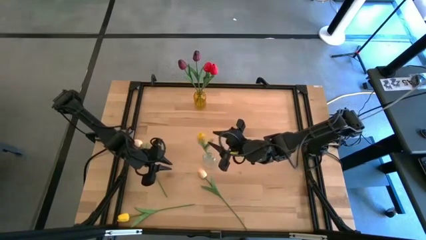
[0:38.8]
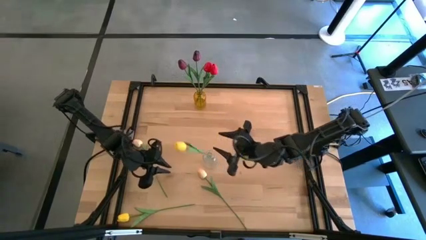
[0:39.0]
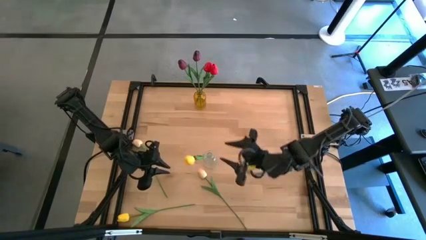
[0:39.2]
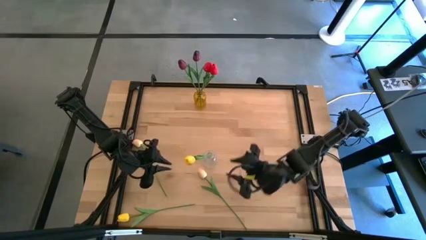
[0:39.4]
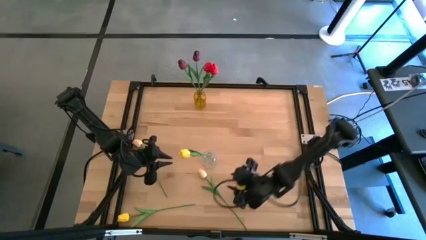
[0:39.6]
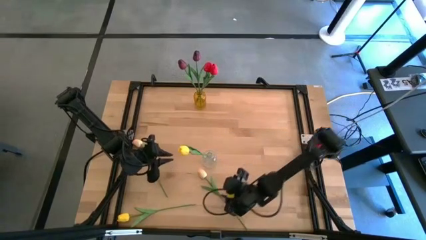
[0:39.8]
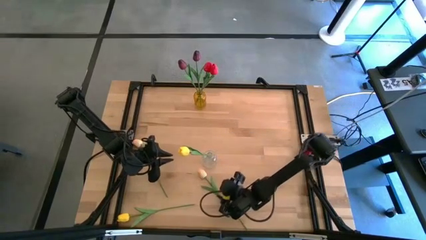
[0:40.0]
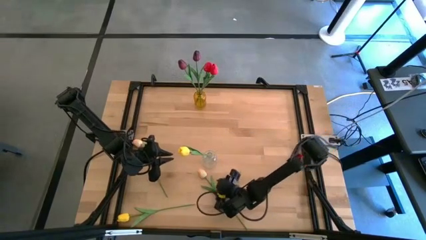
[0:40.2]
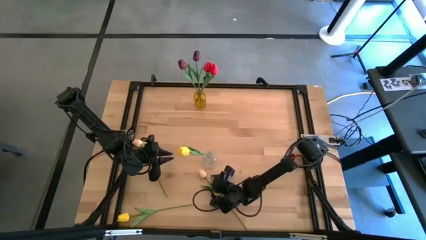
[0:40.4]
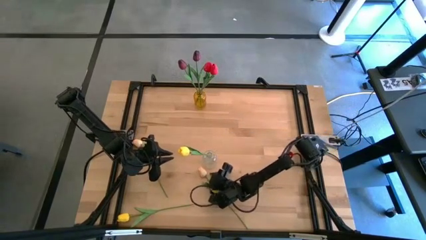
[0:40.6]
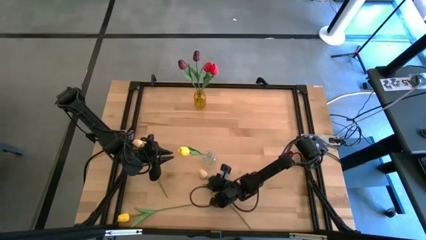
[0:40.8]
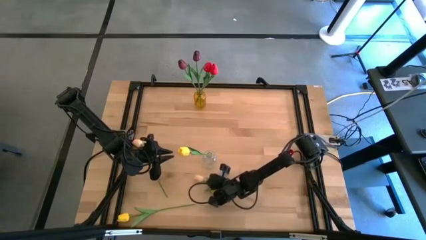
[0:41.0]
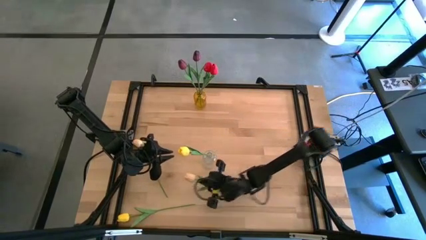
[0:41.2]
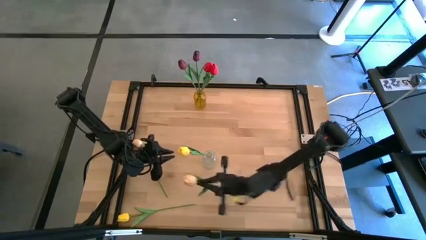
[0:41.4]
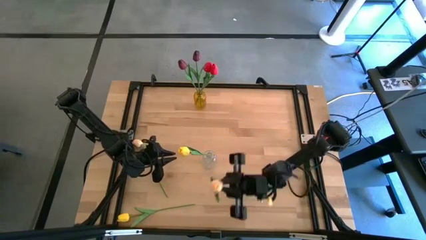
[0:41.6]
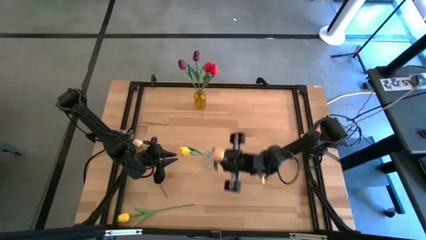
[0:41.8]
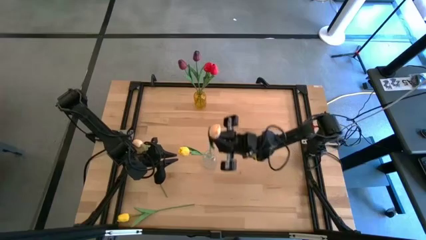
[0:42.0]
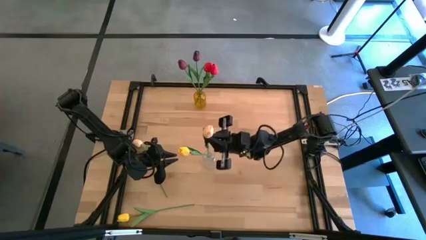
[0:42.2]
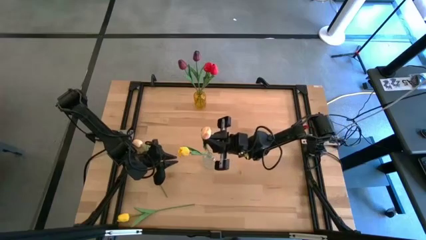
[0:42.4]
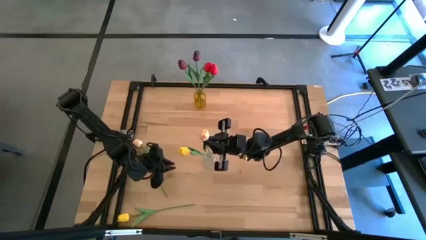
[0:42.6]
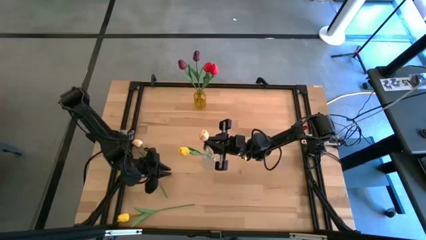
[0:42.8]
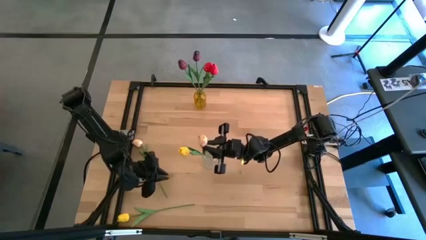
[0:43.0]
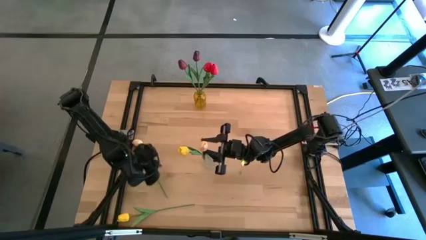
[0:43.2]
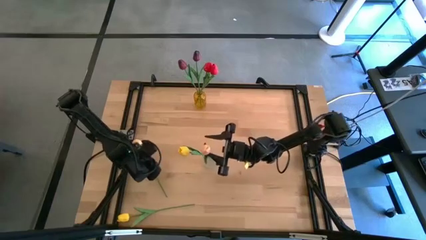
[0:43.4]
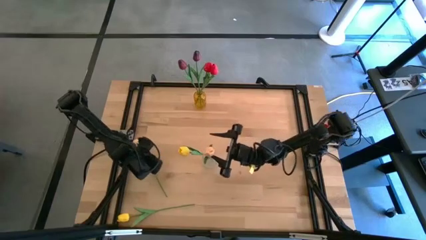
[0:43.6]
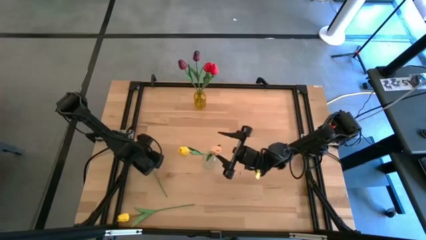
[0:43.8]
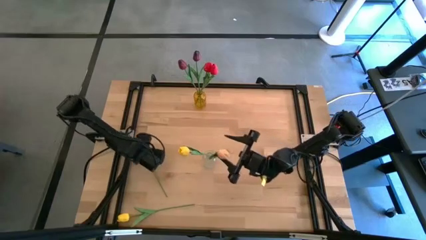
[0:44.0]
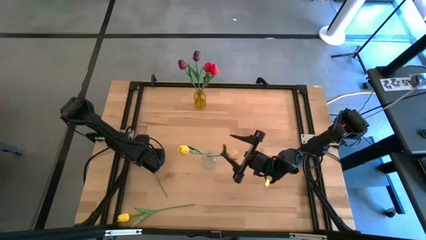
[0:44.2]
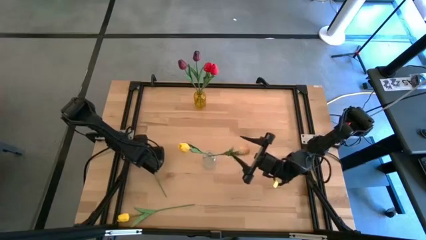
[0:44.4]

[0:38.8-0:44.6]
Task: Sort flowers into vase by color
Put the bottom pink flower into the transparent vase

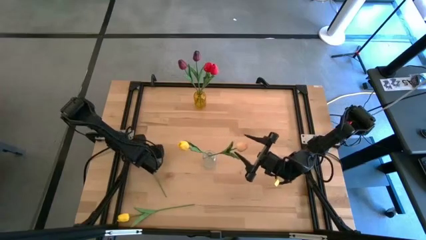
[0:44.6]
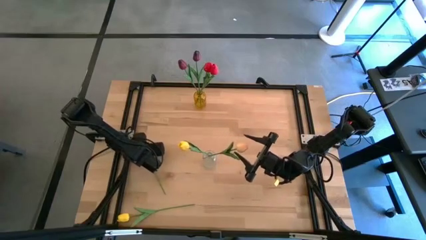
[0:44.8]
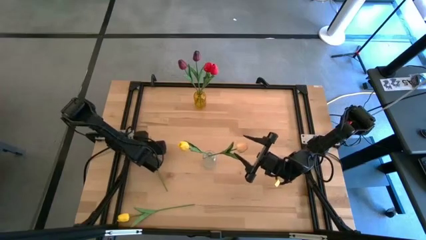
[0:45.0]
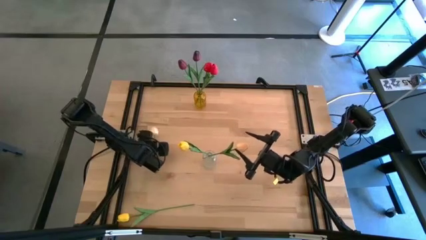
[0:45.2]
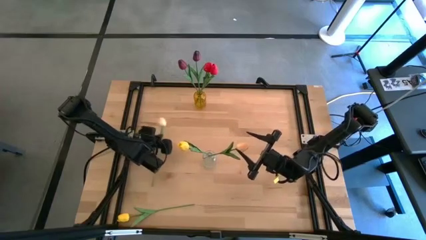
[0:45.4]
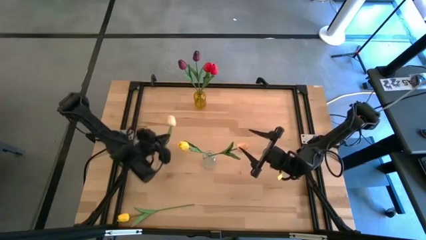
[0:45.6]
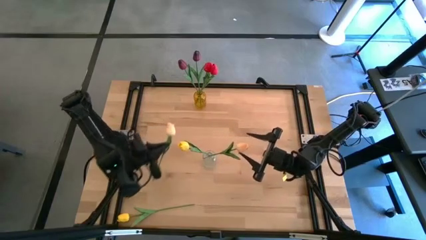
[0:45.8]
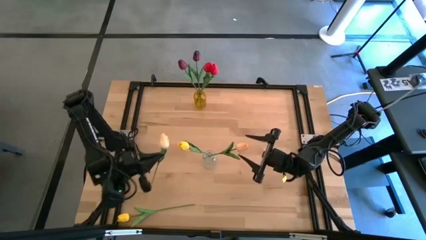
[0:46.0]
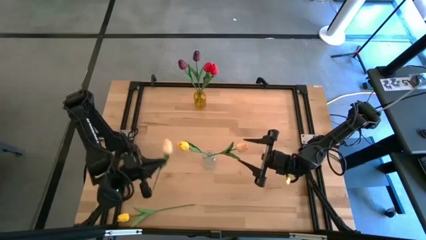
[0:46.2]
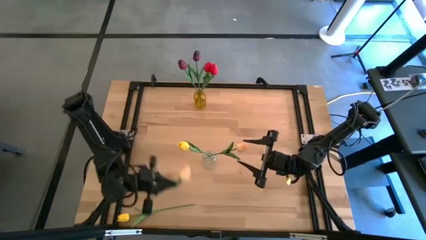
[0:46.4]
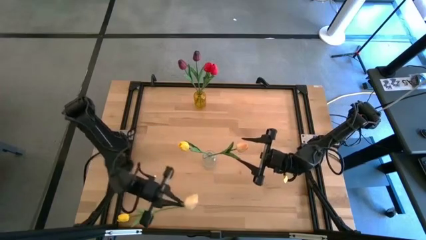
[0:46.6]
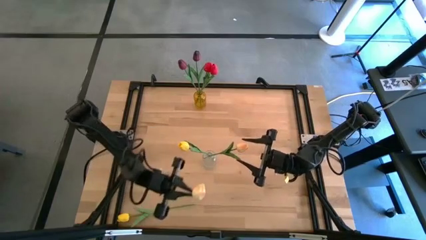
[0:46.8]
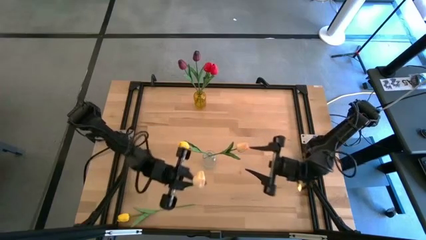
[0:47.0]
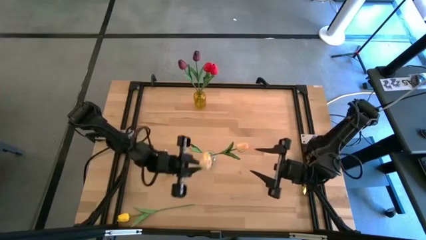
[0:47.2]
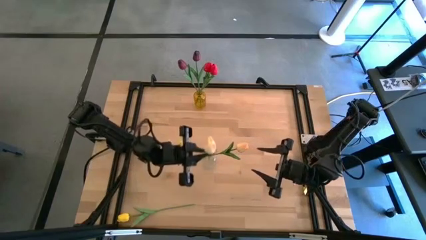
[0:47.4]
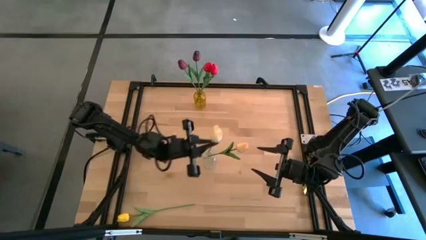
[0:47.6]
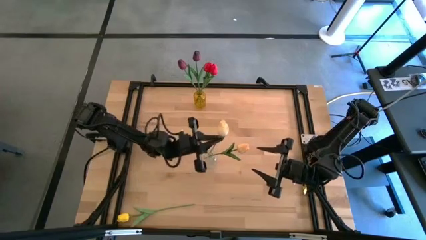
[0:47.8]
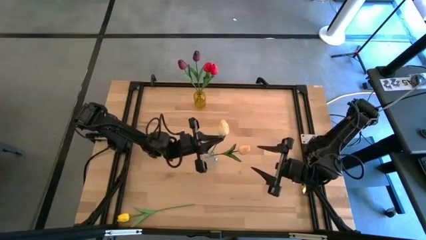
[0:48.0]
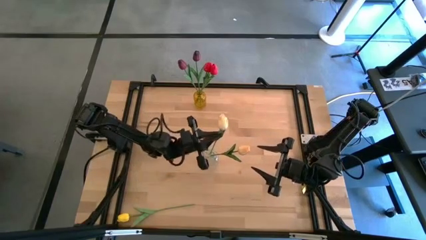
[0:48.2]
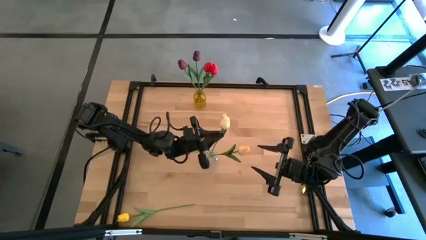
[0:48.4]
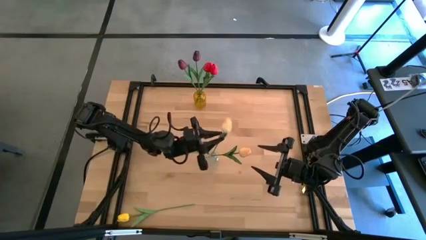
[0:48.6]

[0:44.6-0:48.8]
Put the pink flower into the transparent vase

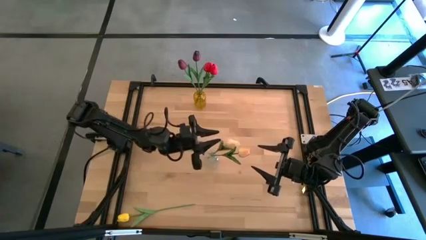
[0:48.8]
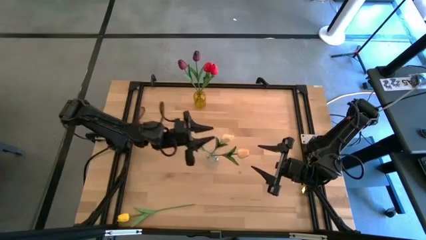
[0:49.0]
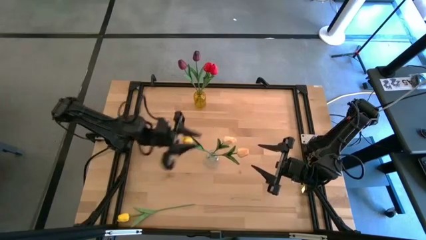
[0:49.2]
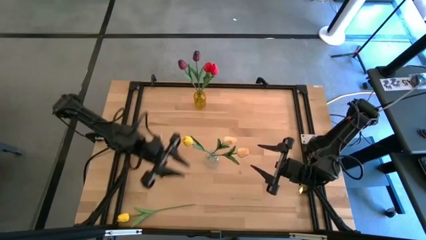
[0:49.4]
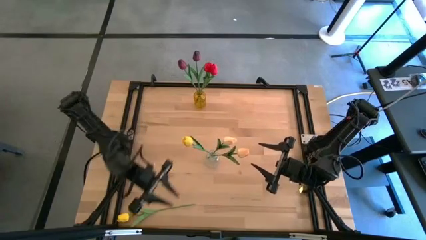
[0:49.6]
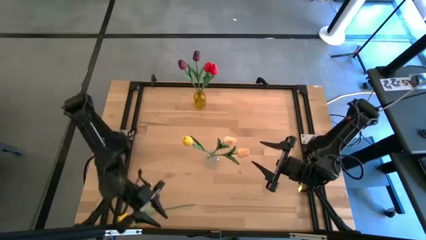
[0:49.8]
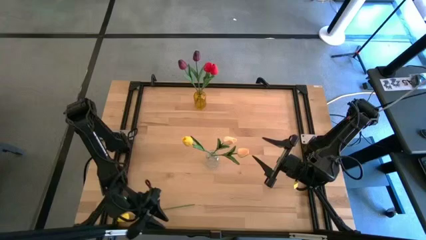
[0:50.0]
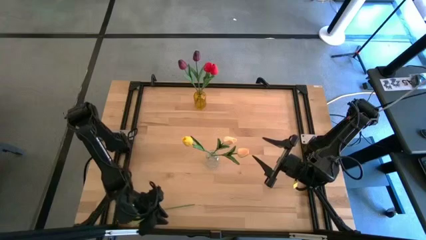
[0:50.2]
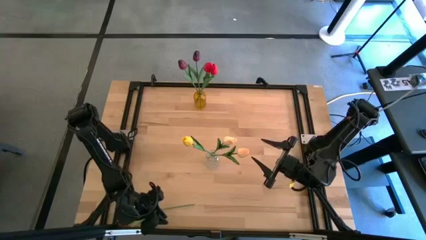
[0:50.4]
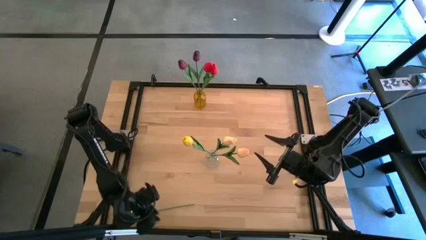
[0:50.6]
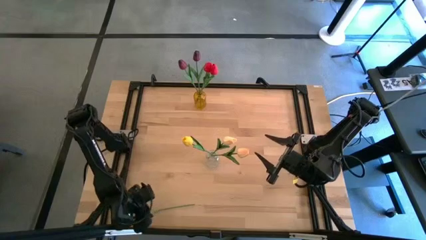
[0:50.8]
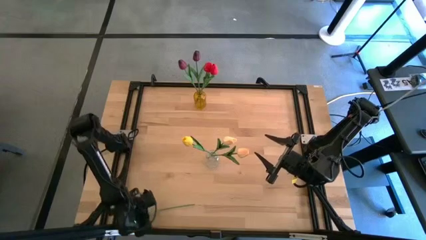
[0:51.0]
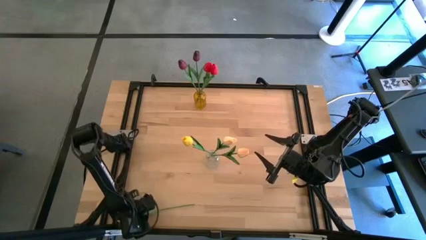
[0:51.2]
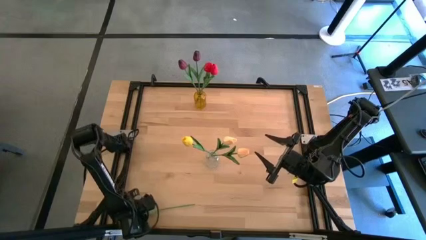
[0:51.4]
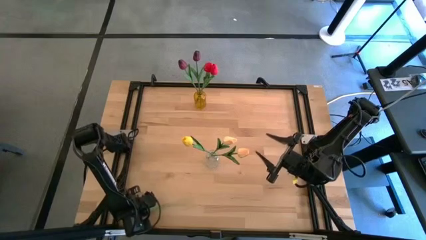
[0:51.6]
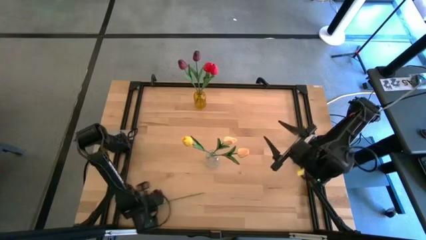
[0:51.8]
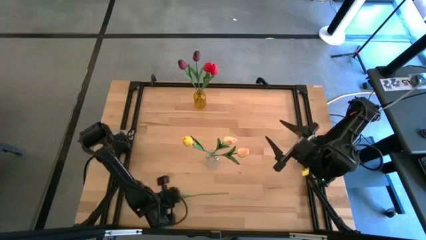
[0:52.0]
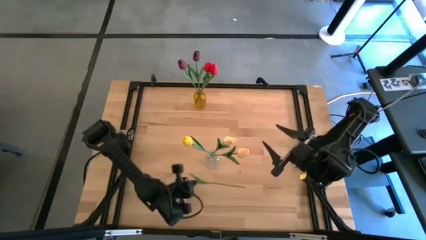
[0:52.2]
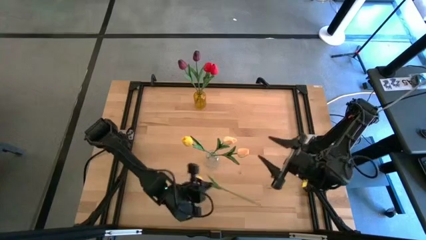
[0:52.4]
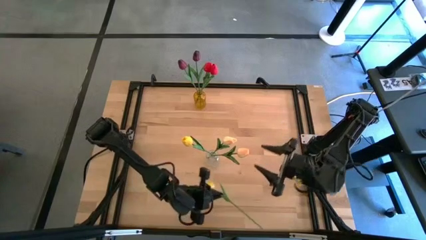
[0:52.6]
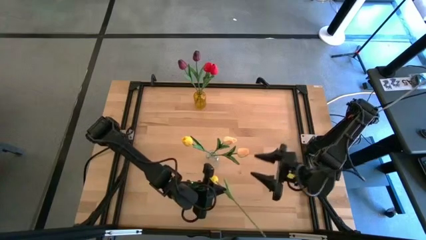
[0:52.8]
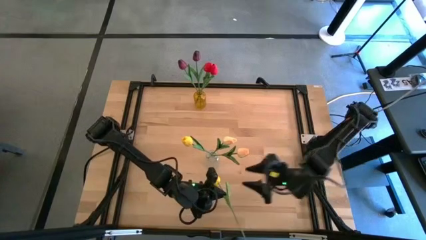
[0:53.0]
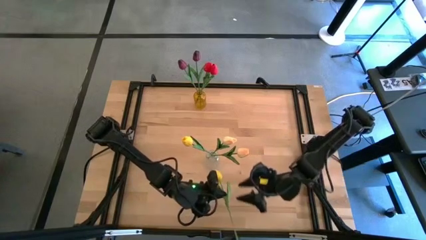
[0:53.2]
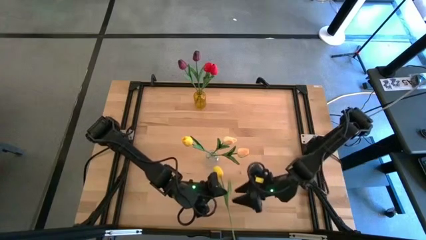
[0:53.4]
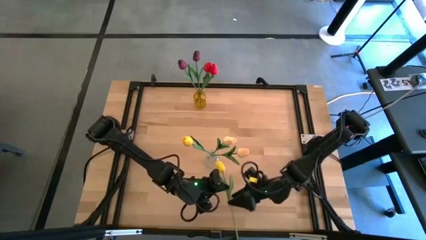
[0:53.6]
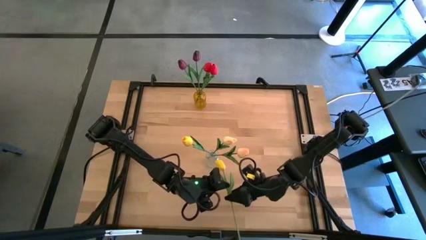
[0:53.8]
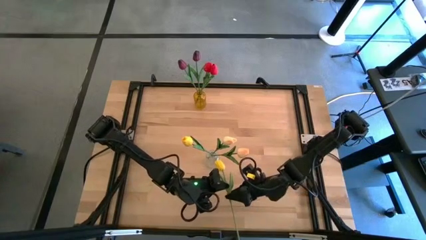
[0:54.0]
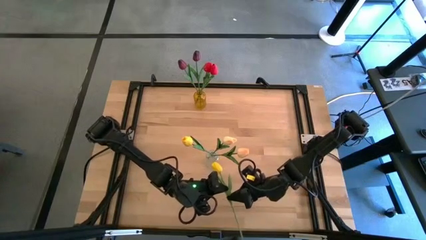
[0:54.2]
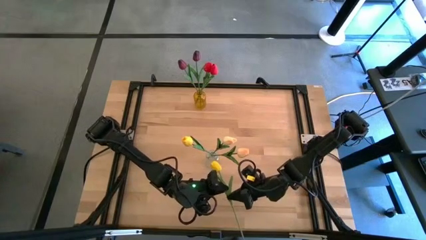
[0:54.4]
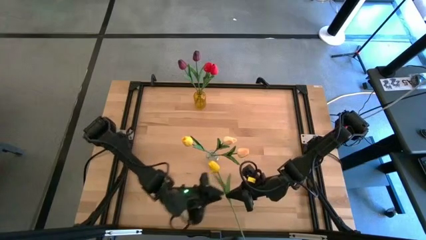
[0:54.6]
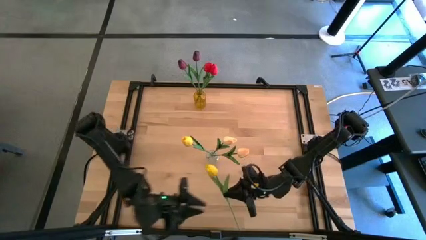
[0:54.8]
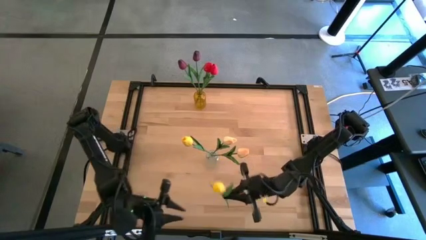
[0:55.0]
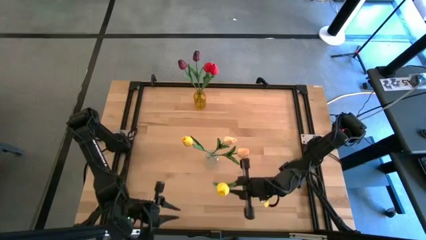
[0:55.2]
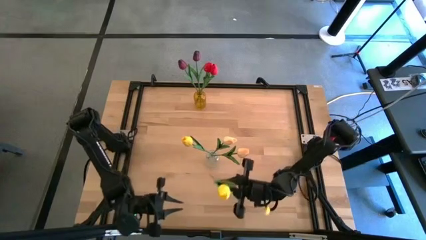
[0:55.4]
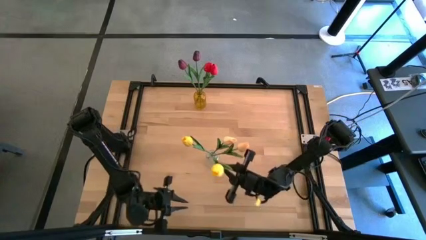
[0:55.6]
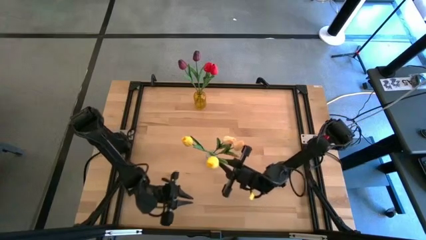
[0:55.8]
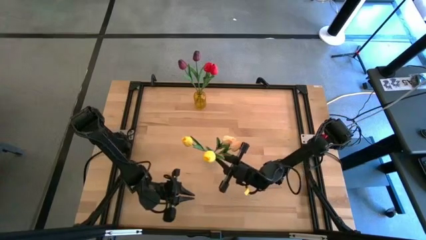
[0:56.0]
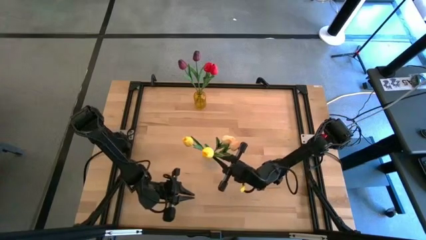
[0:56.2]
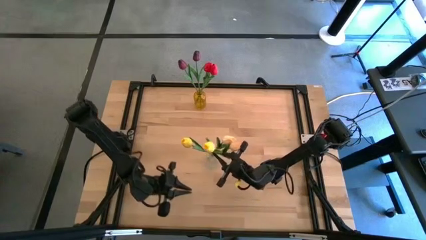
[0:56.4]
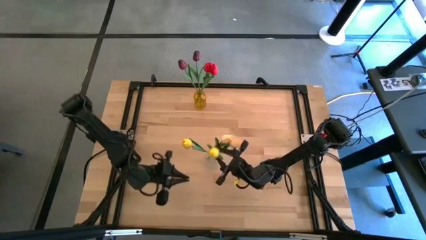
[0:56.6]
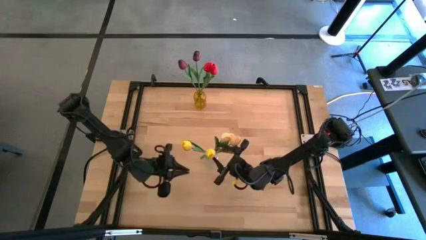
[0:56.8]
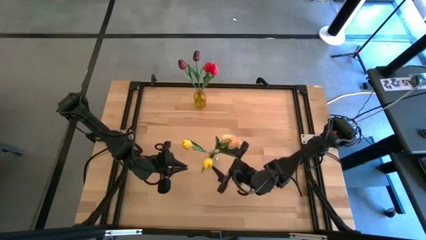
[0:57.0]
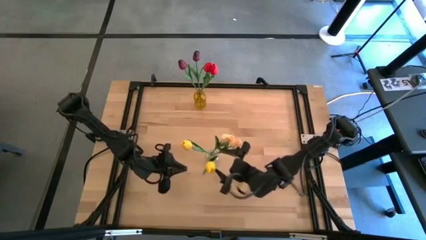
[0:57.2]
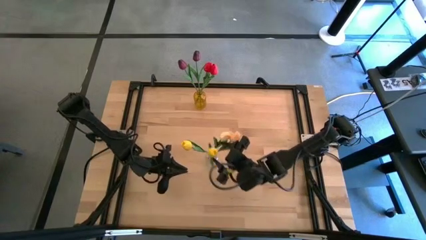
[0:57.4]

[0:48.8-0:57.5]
Put the yellow flower into the transparent vase
